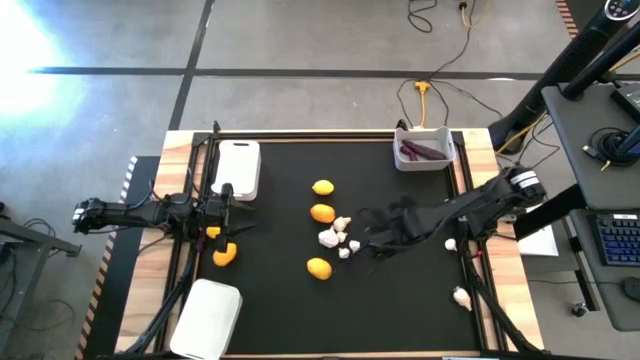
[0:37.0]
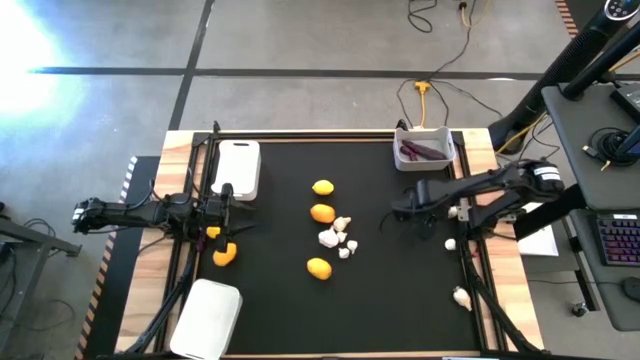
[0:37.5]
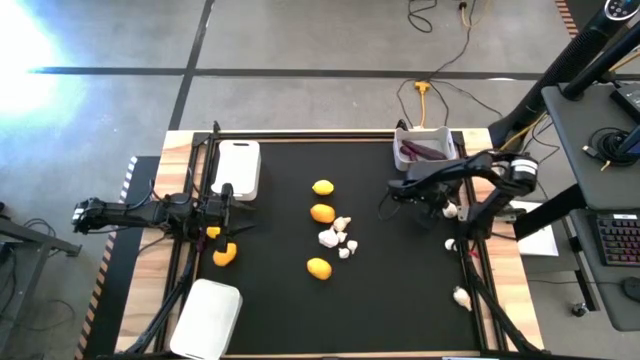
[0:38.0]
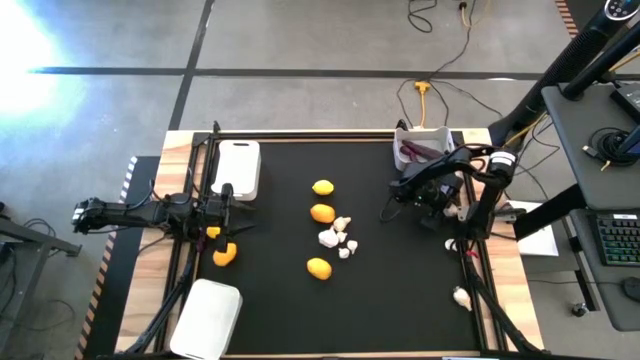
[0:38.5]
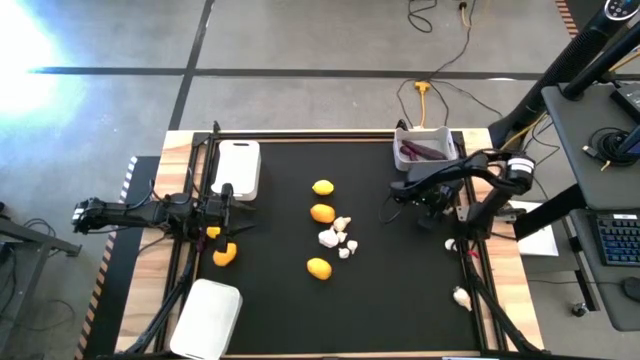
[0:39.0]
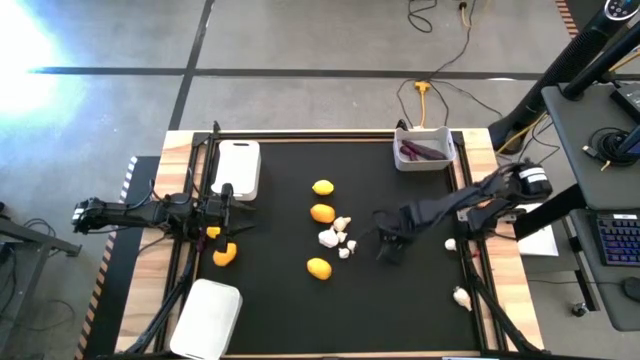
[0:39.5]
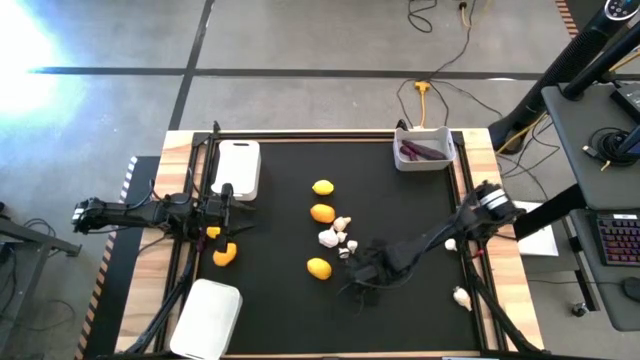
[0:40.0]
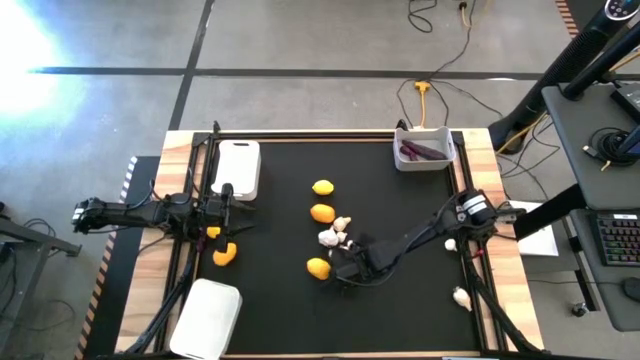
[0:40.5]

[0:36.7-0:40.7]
Task: Sort produce into baskets
Move the garlic to the center of the table

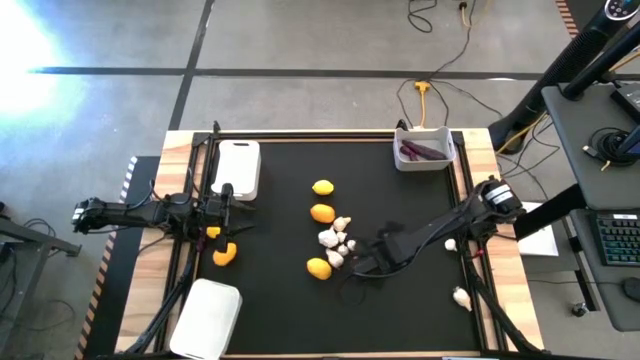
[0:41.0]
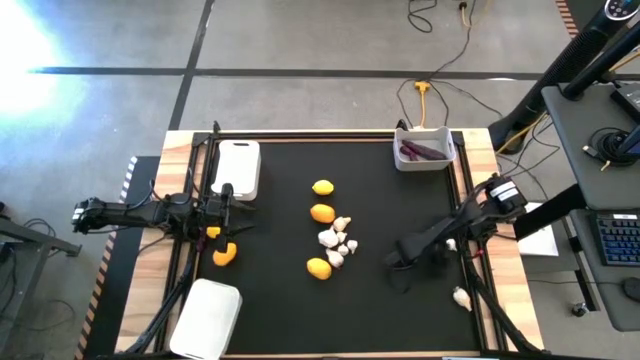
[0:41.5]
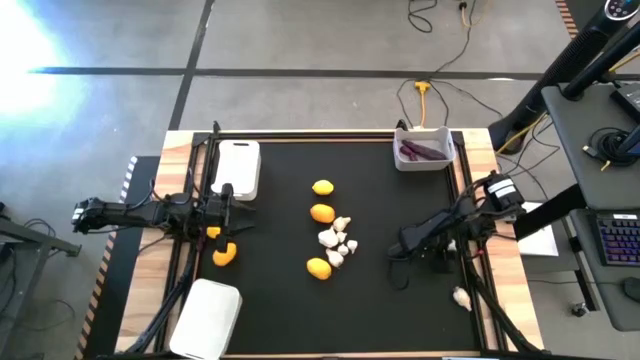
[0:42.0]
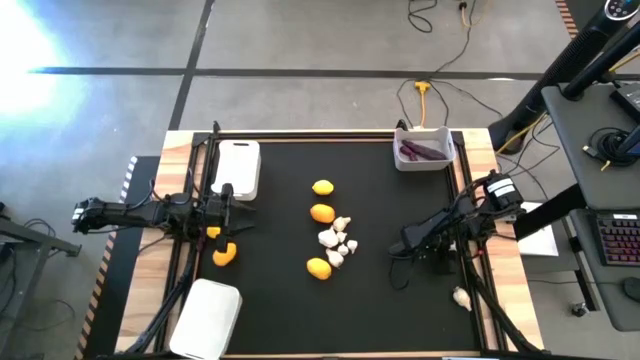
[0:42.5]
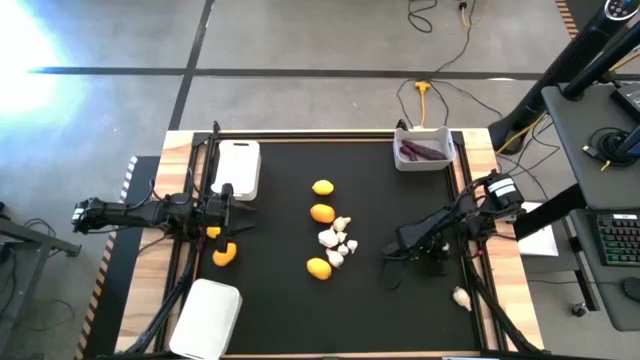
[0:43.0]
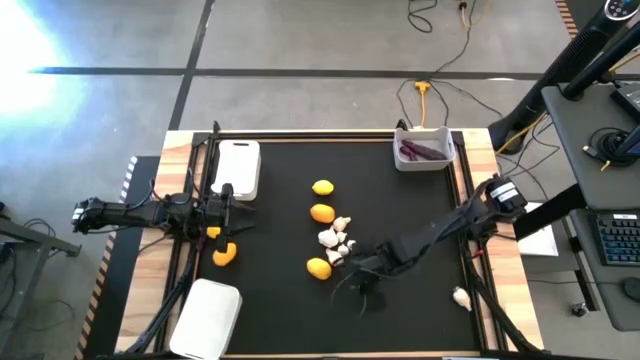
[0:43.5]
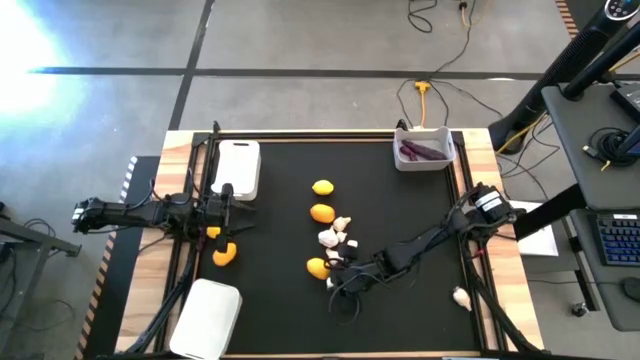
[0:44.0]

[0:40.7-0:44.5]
Move the small garlic to the center of the table

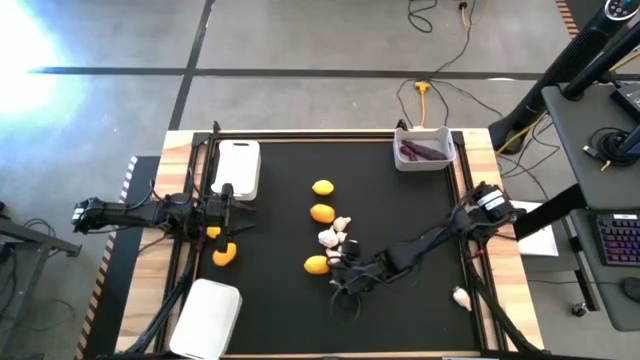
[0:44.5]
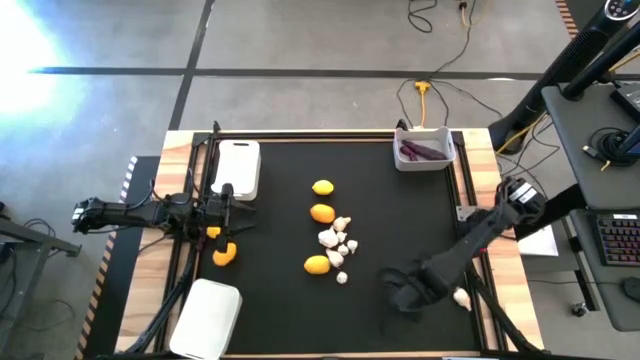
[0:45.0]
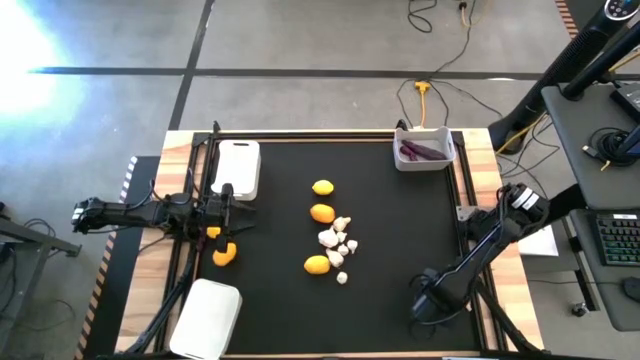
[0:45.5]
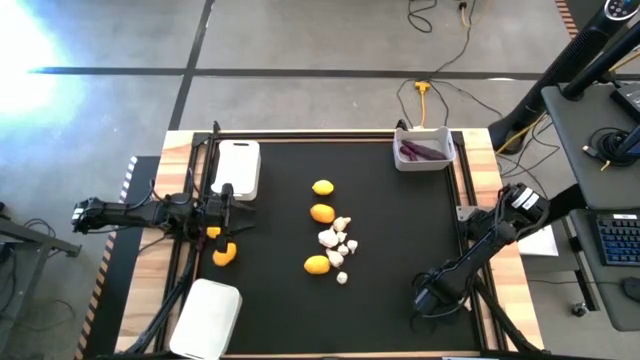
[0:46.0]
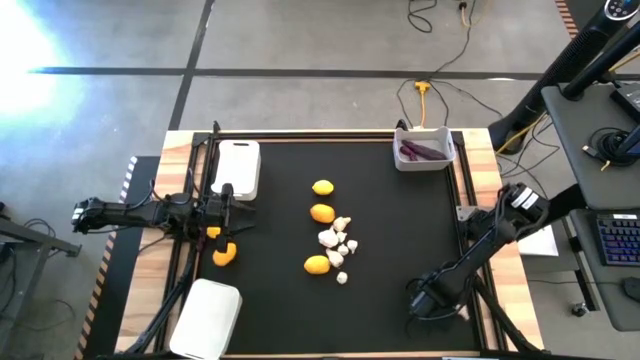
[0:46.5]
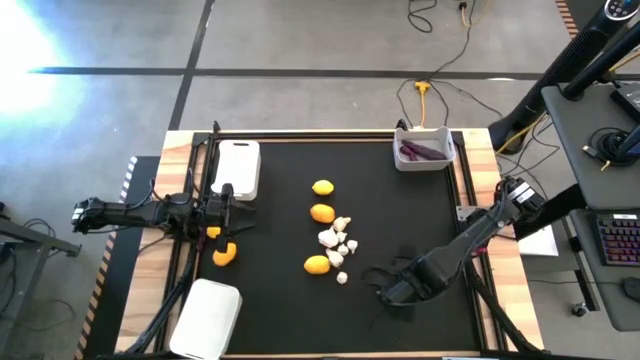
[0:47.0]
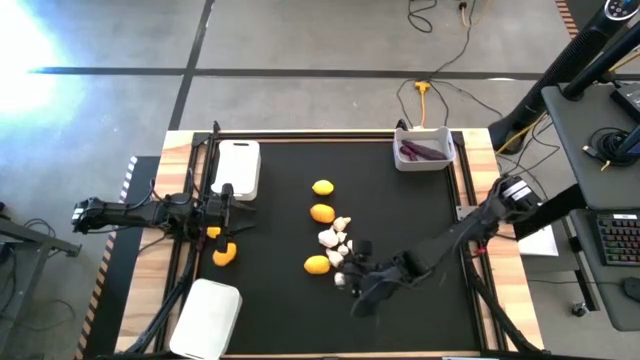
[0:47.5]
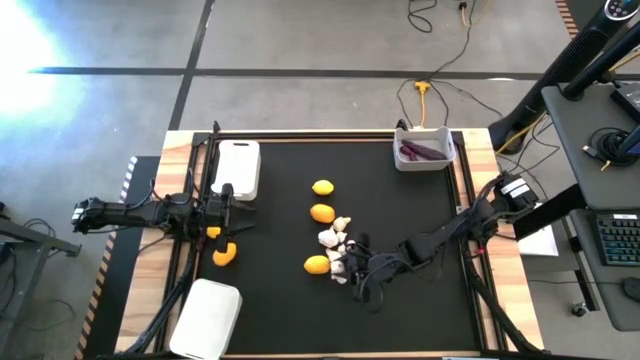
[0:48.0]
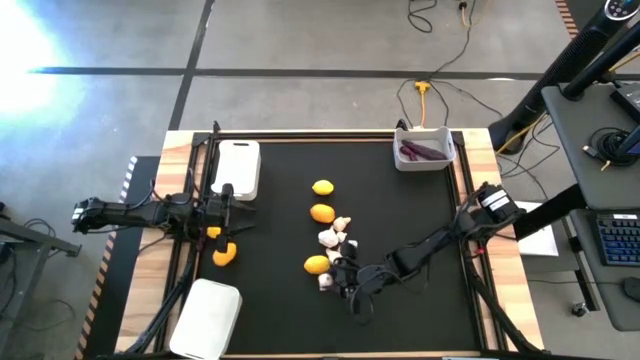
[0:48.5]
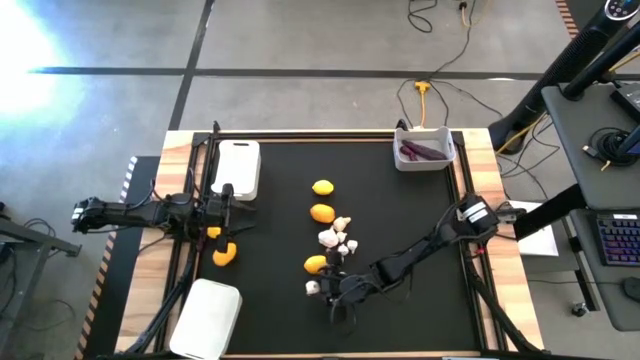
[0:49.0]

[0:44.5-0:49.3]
Move the big garlic to the bottom of the table

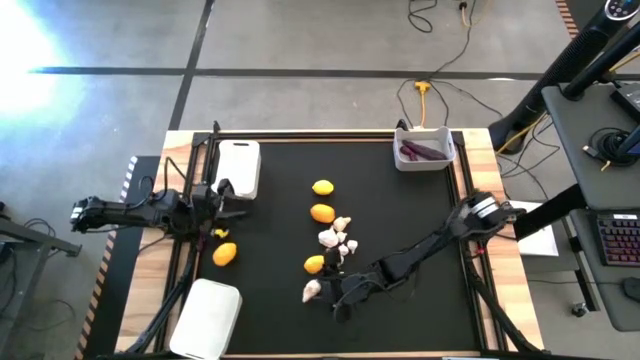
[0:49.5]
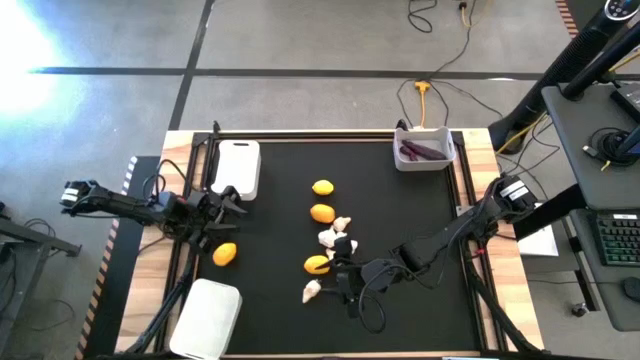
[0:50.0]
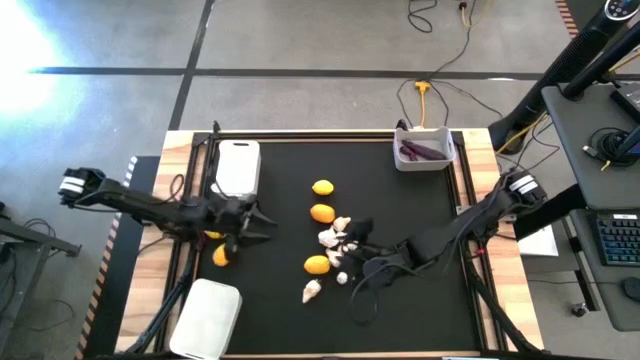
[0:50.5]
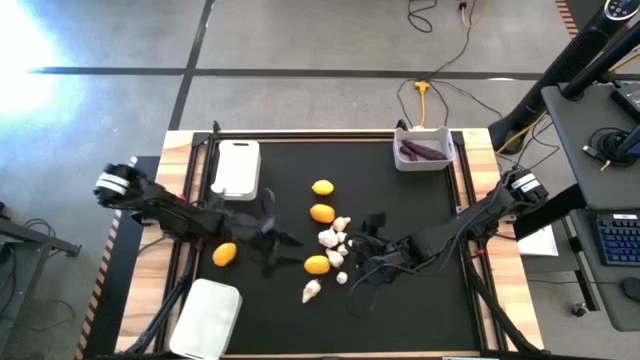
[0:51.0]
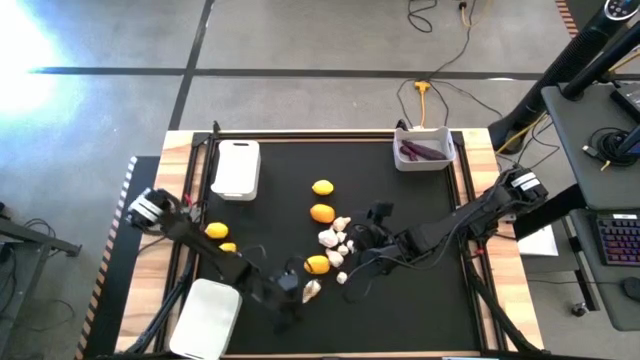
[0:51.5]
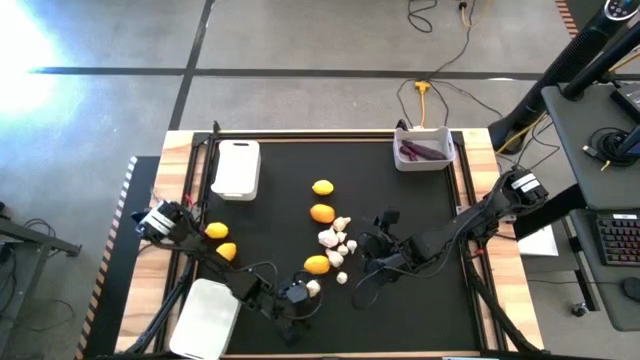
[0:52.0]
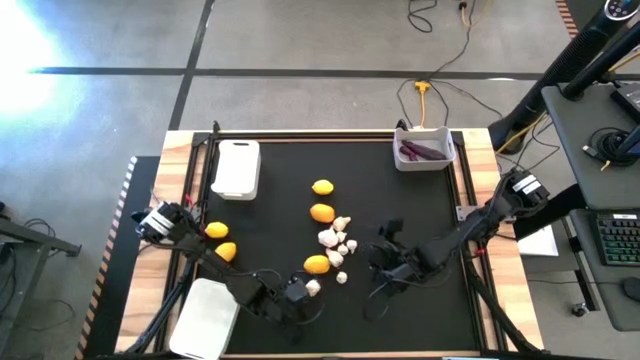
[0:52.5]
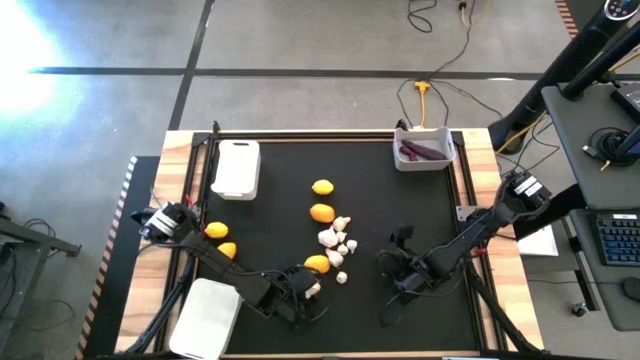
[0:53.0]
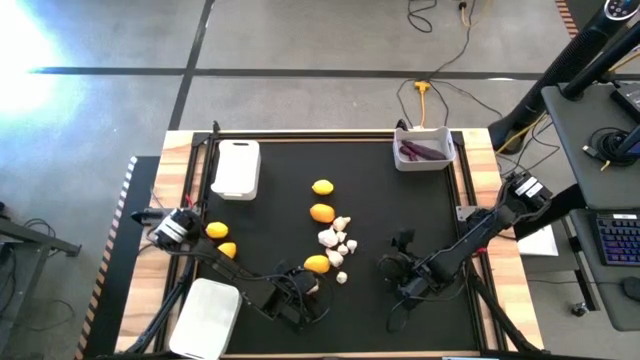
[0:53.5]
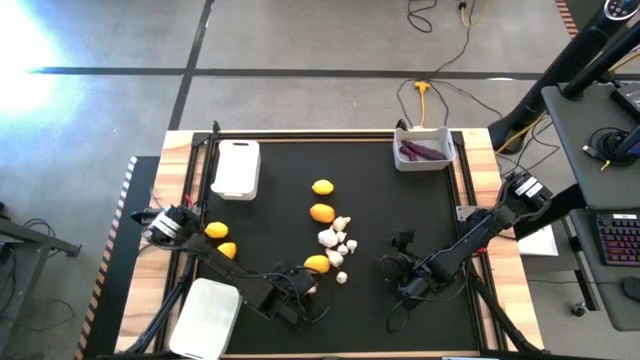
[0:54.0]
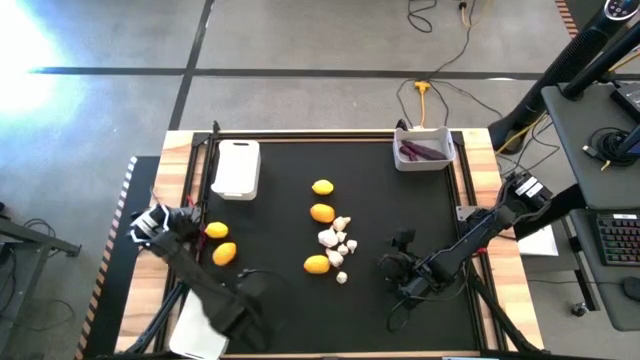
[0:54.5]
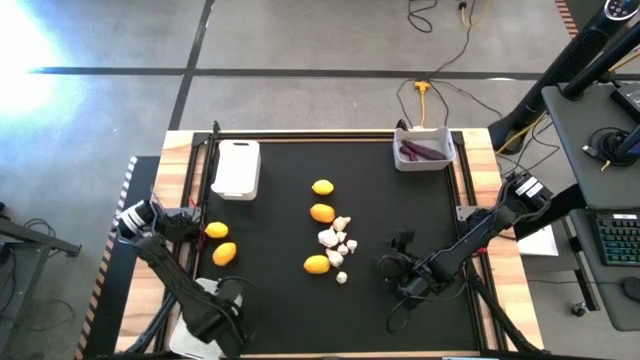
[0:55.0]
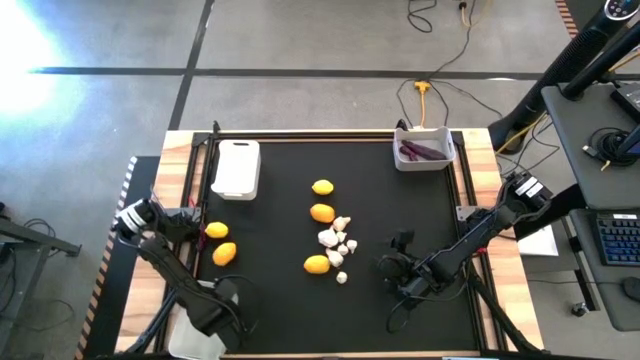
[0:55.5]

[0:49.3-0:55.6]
Put the big garlic into the bottom white bin

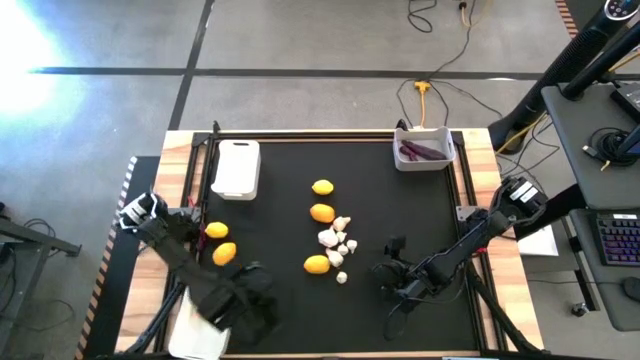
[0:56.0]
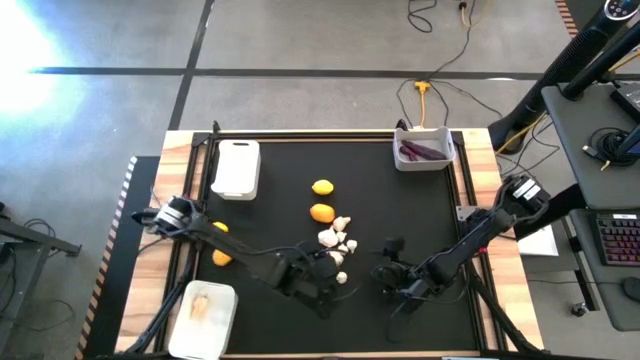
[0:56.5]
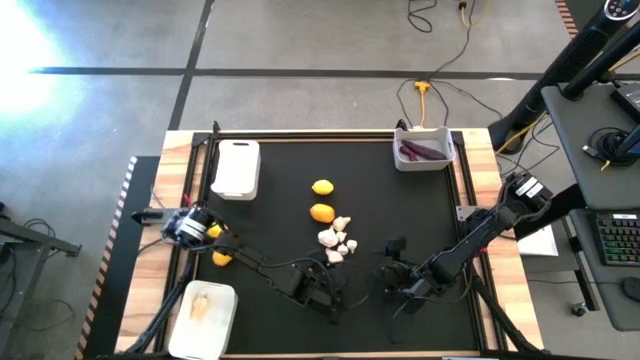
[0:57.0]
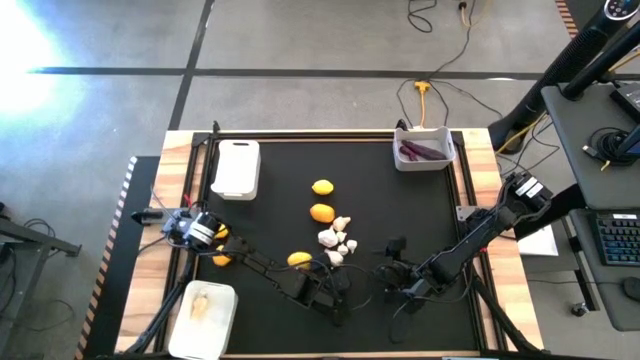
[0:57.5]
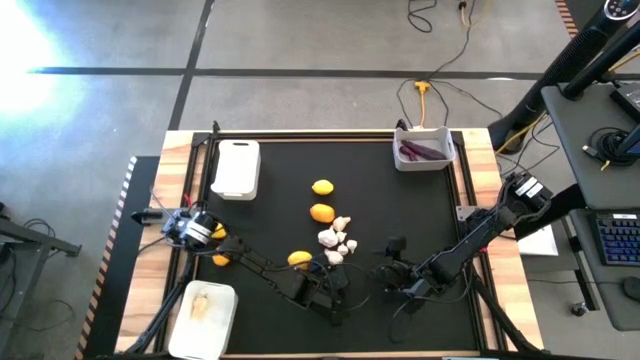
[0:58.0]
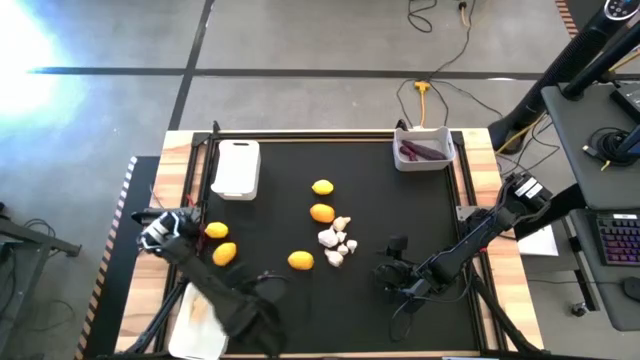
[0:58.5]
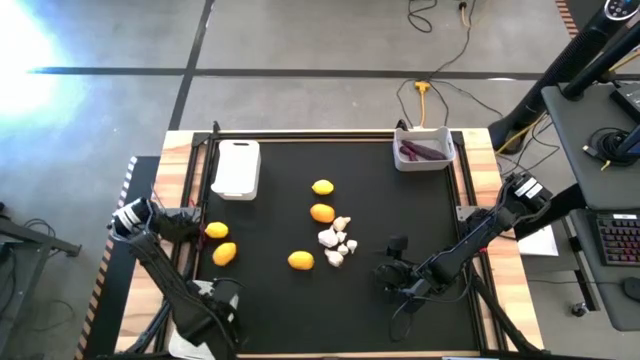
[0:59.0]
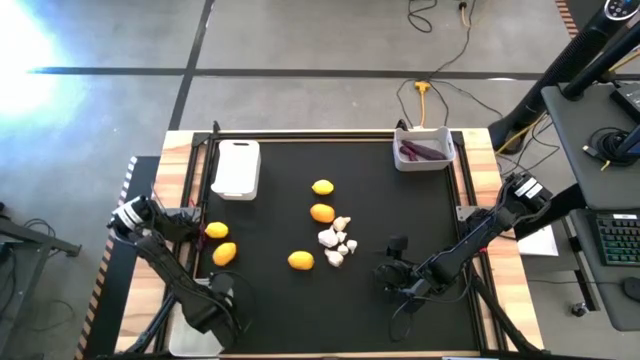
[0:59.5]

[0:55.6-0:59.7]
Put the small garlic into the bottom white bin
